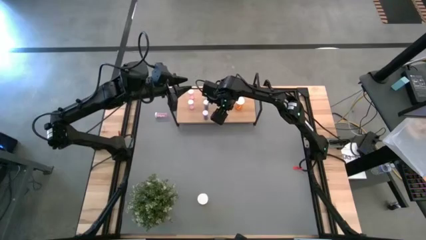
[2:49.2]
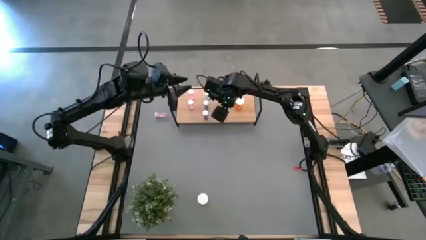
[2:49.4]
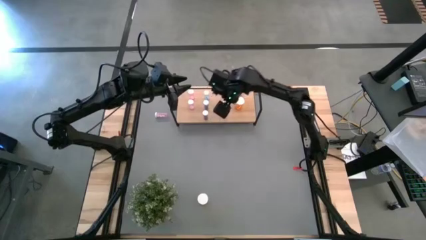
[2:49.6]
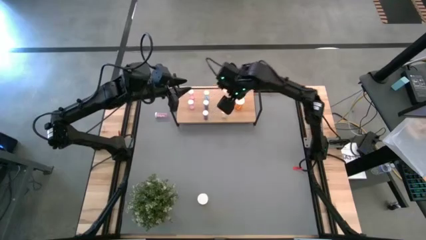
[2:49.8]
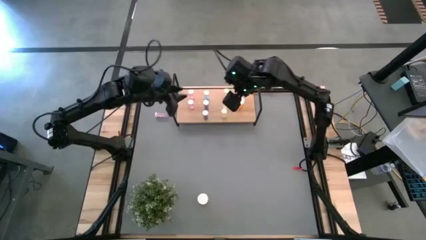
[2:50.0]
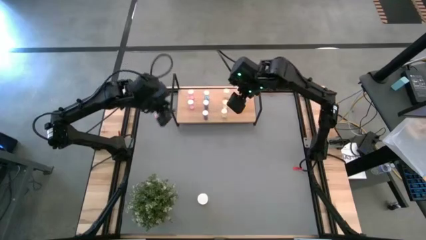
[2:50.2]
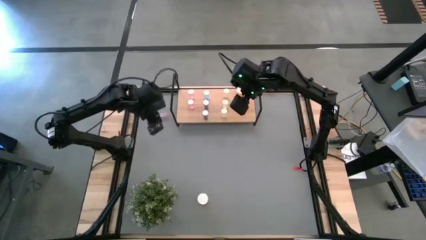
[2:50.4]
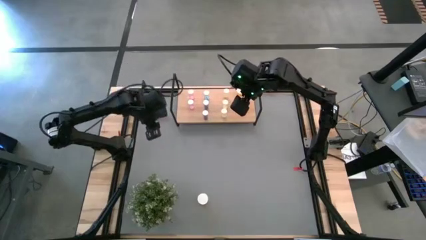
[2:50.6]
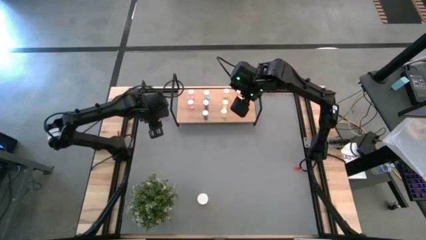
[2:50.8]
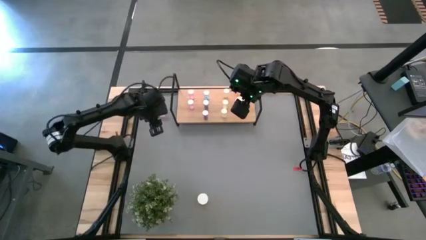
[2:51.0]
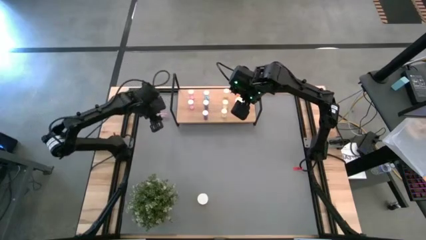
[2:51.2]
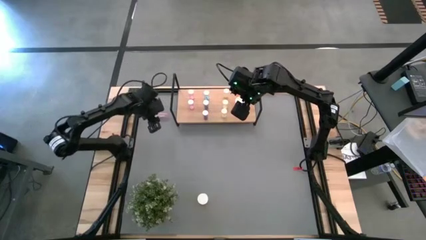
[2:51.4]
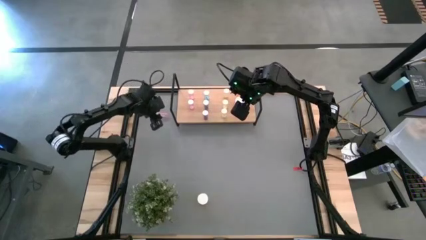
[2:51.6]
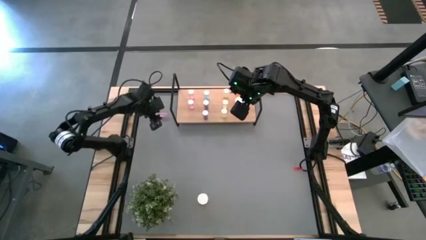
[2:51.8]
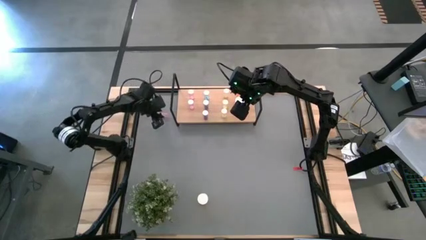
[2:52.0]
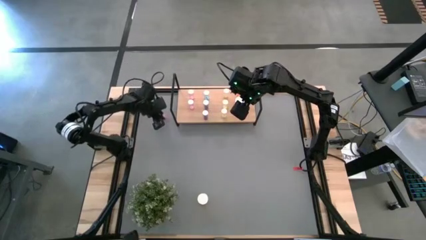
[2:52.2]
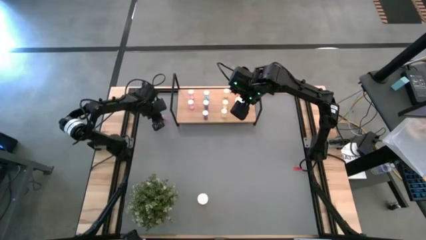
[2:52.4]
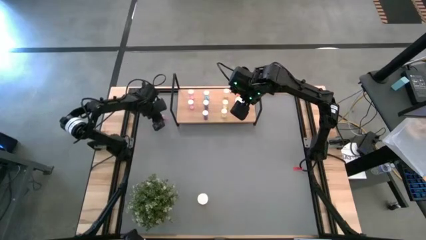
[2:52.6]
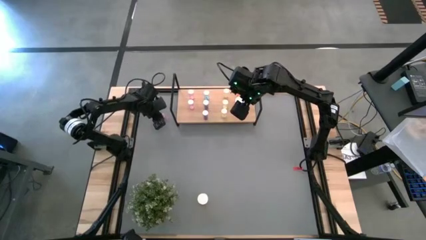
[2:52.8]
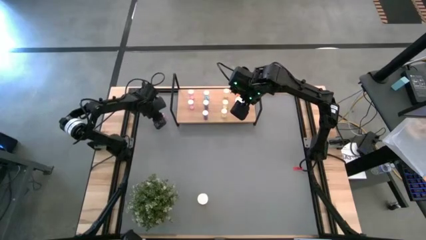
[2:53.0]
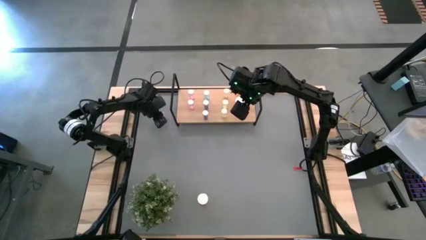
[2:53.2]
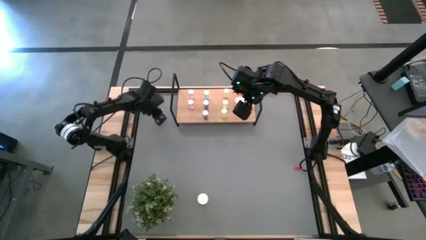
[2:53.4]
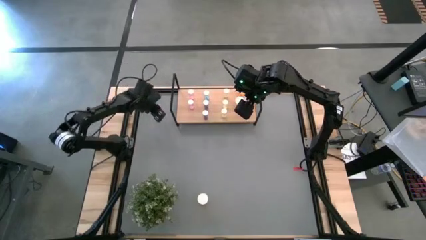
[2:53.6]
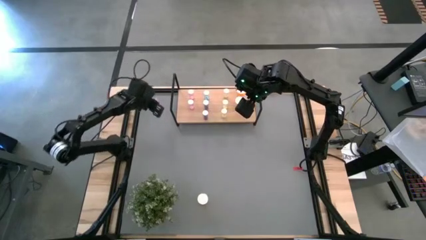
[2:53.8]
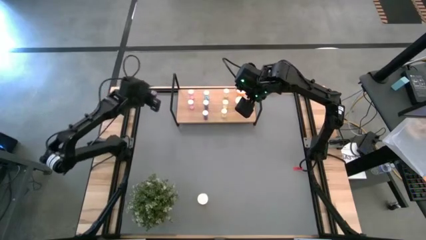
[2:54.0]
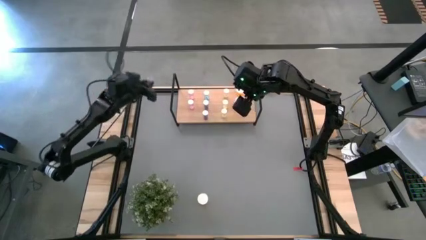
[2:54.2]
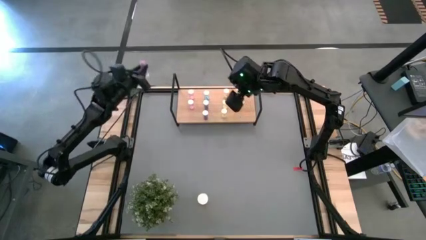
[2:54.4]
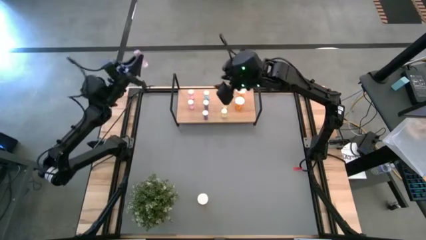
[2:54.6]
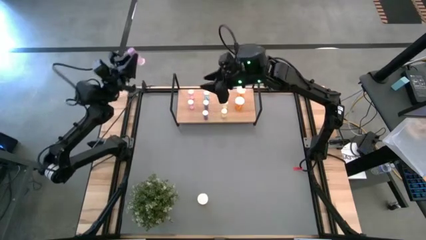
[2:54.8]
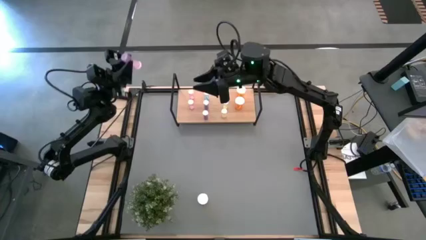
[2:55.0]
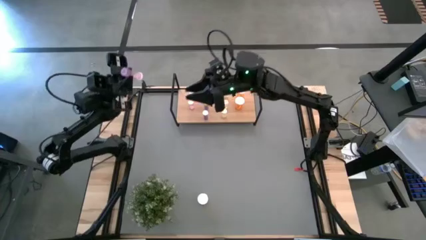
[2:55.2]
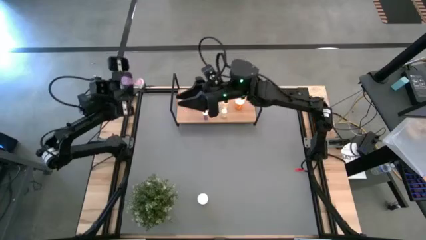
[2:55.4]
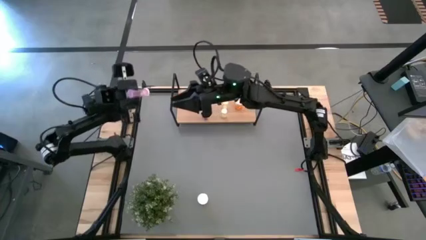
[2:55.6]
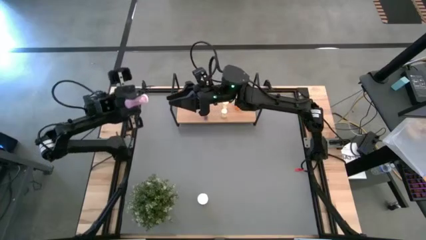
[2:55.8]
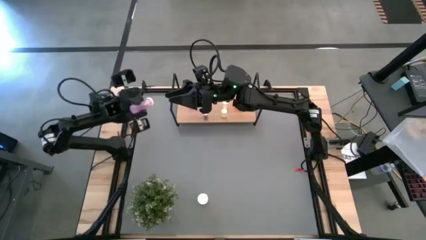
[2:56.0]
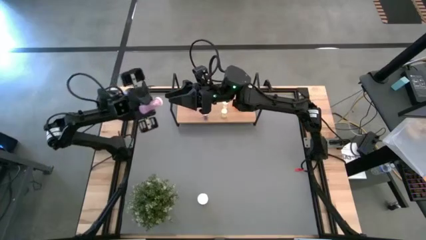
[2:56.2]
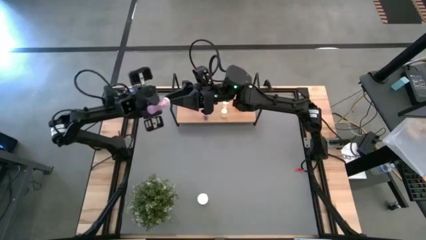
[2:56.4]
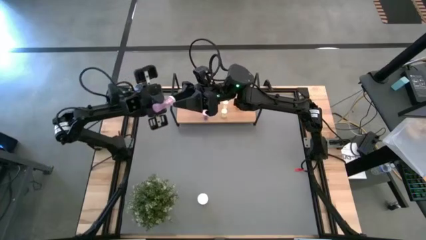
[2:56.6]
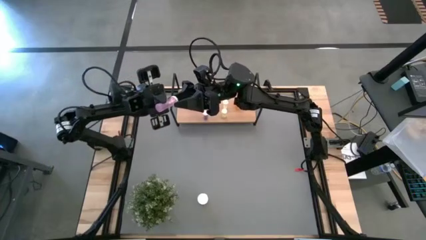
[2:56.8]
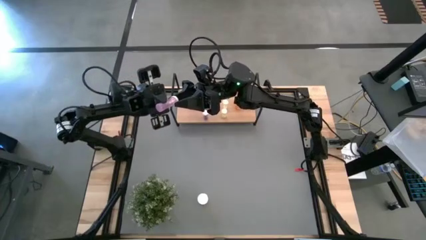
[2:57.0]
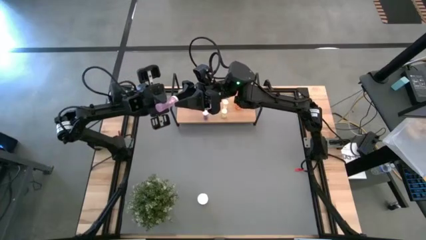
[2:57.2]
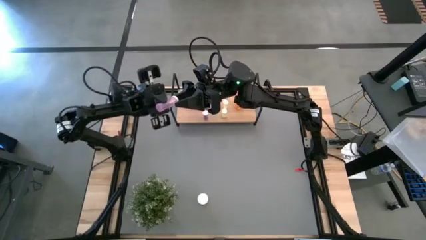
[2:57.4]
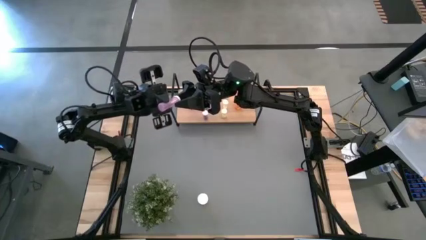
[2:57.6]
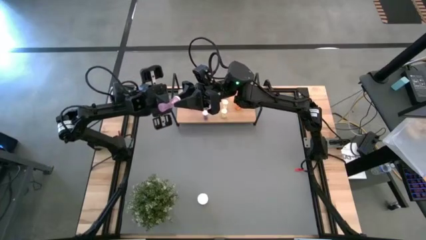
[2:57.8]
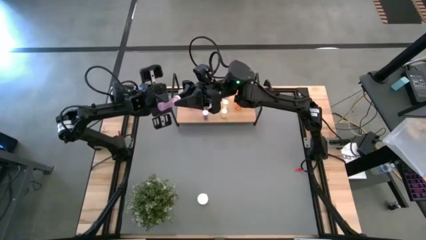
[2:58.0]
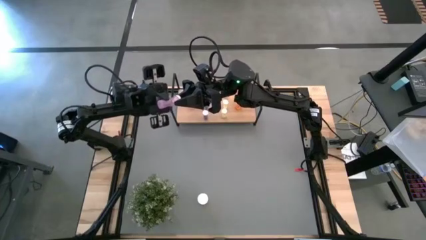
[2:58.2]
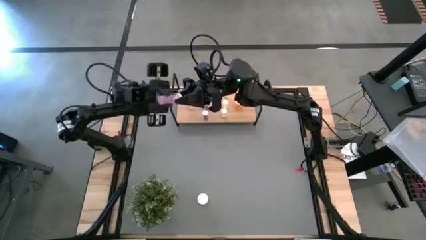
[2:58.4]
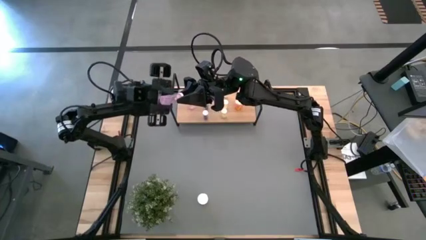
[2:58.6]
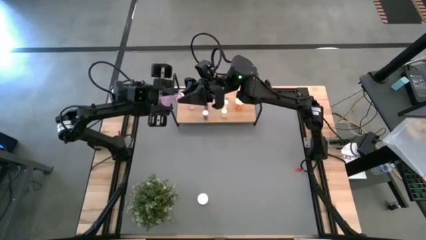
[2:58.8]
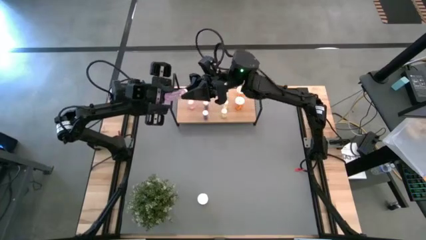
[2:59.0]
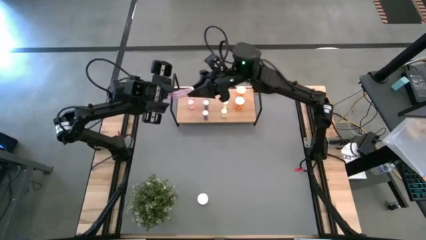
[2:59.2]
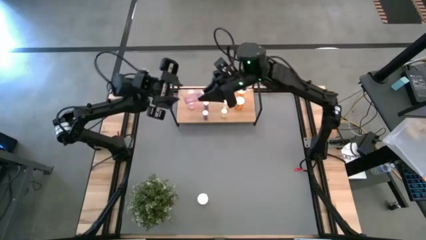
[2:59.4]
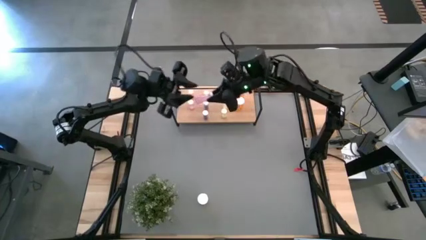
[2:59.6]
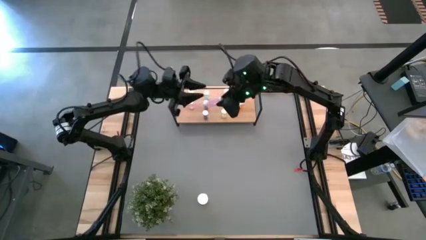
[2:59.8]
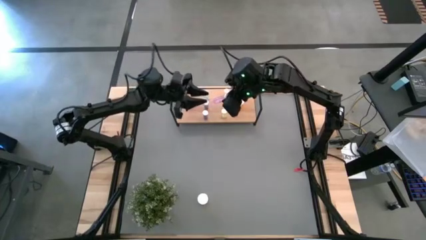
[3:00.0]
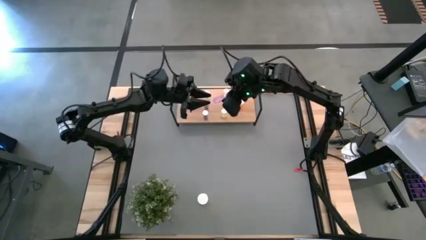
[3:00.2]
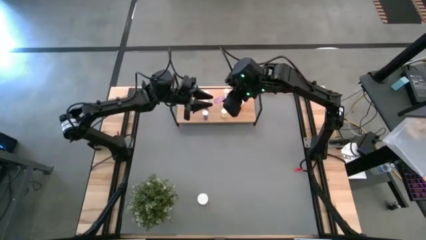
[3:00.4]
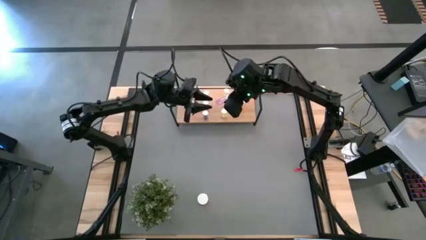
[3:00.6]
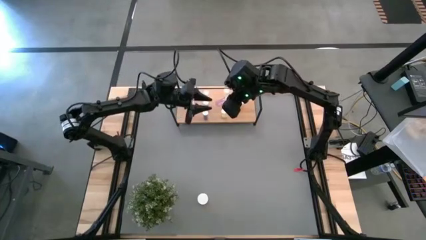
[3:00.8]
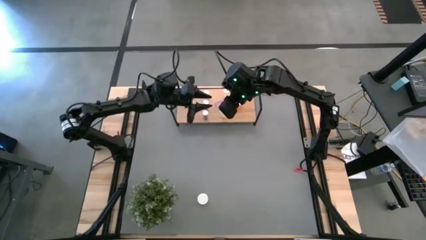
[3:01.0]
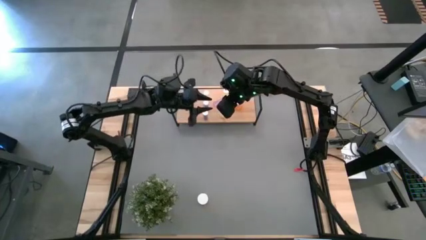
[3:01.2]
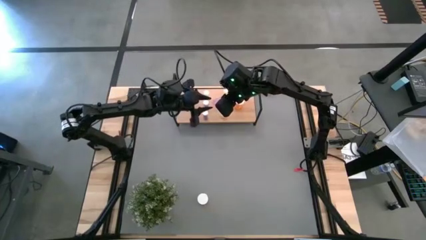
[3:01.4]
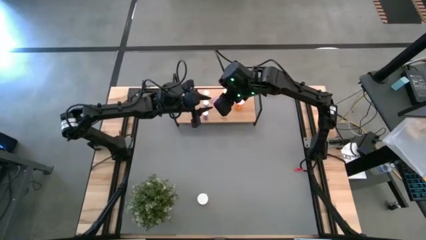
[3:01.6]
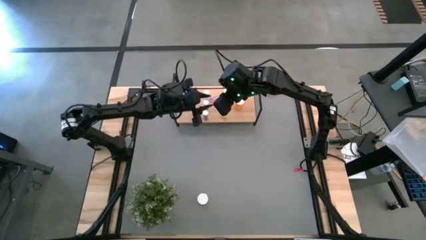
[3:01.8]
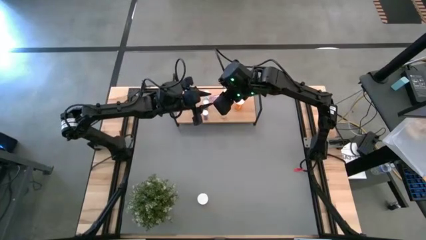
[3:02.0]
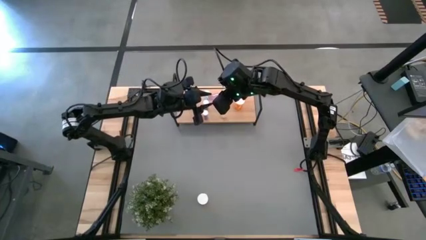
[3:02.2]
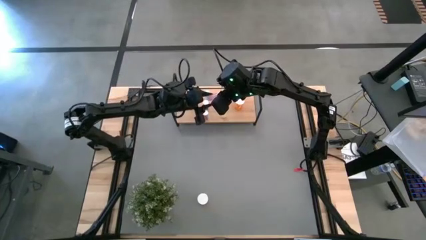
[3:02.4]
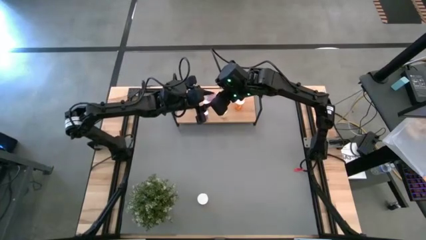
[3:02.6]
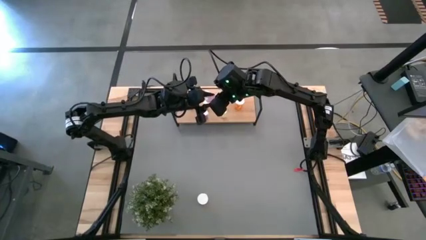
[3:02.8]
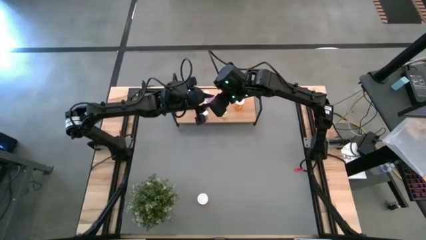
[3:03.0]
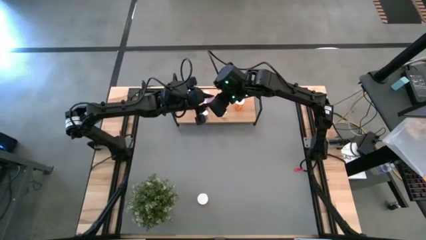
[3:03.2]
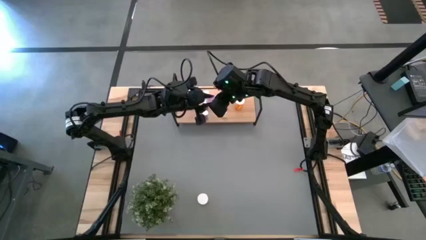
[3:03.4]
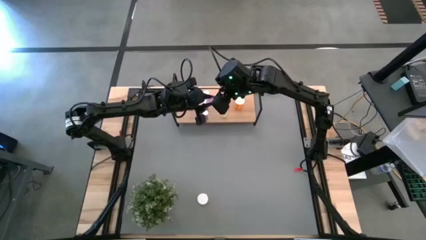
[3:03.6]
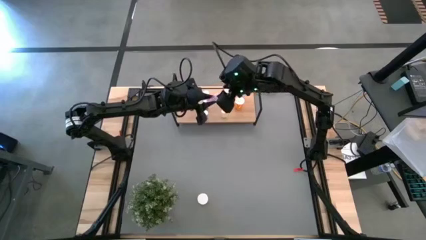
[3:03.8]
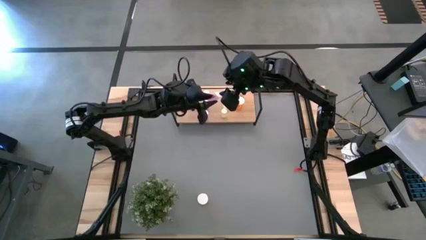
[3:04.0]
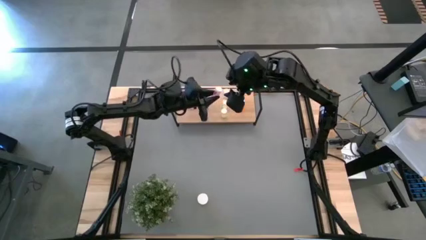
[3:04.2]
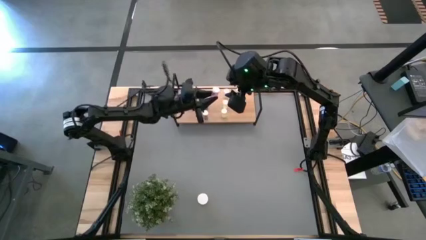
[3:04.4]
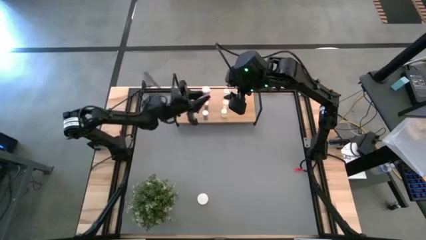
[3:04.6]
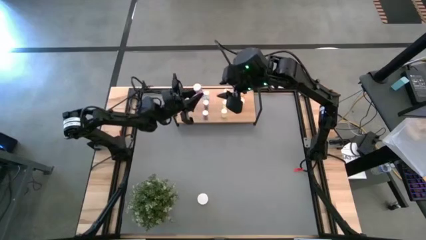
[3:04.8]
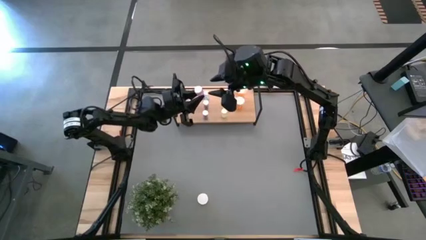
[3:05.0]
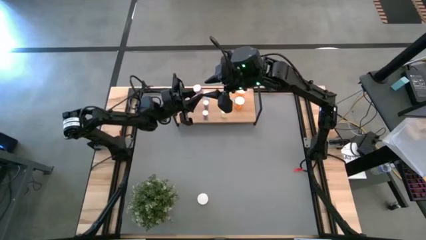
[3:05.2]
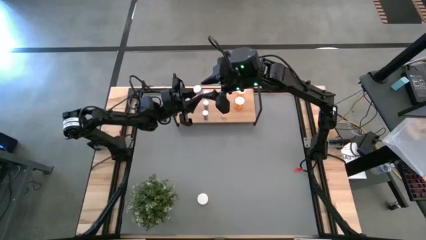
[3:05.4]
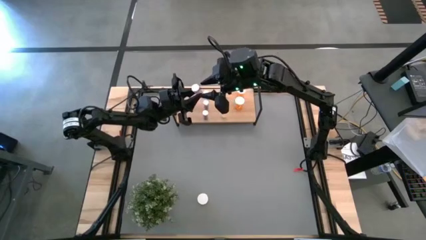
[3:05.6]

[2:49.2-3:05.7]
Task: Pick and place medicine bottles onto shelf by color
Put the pink pill bottle on the shelf aligned with the other pink pill bottles
